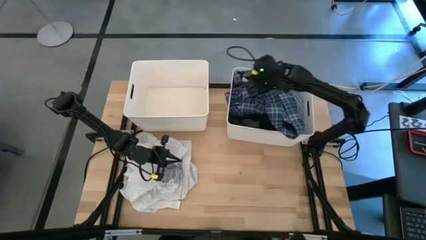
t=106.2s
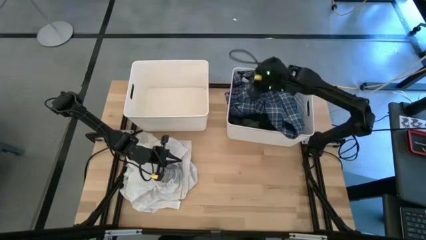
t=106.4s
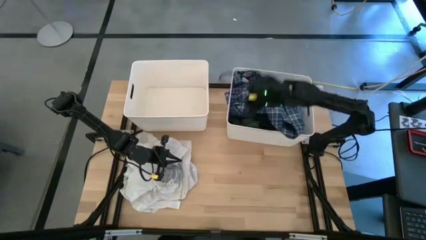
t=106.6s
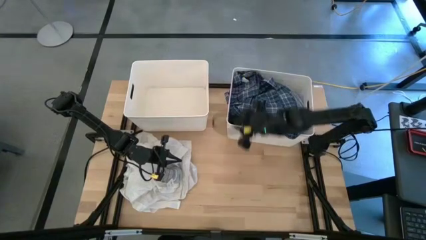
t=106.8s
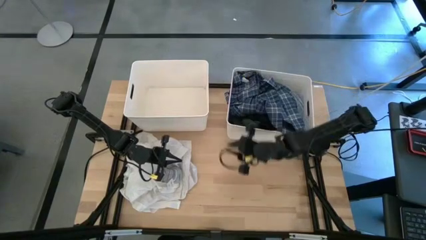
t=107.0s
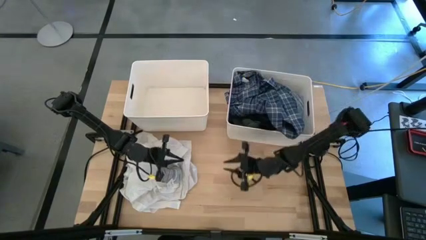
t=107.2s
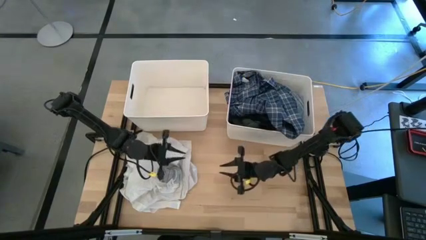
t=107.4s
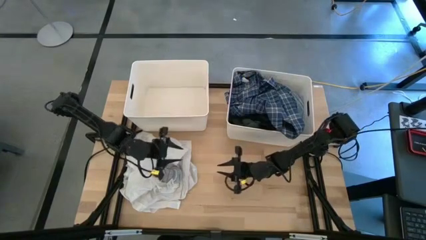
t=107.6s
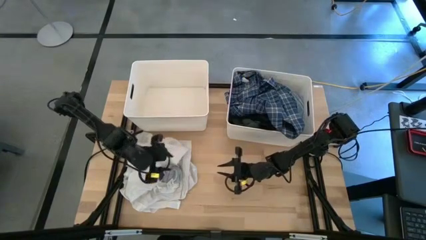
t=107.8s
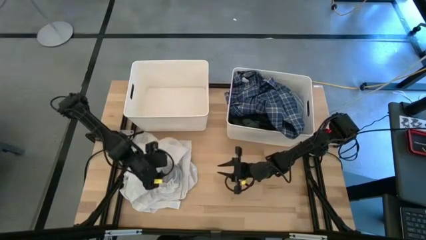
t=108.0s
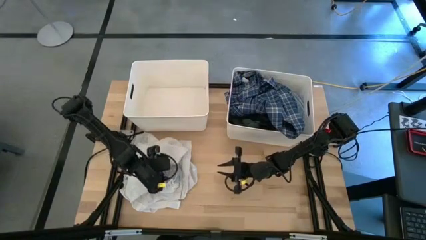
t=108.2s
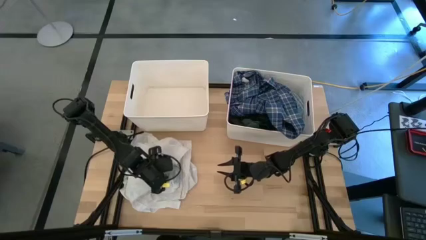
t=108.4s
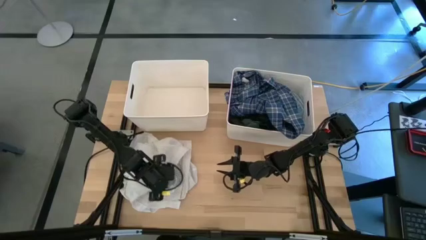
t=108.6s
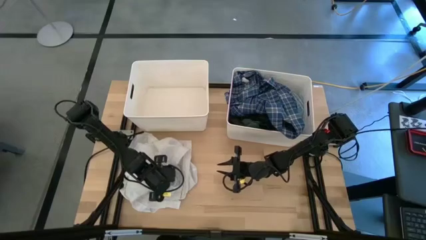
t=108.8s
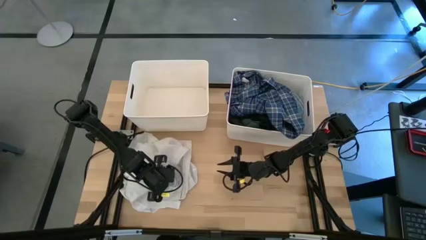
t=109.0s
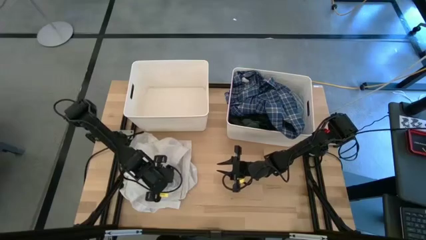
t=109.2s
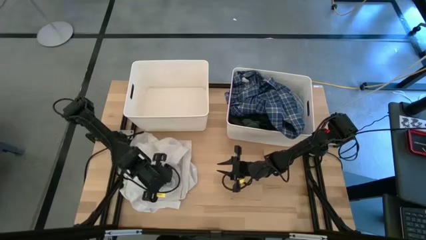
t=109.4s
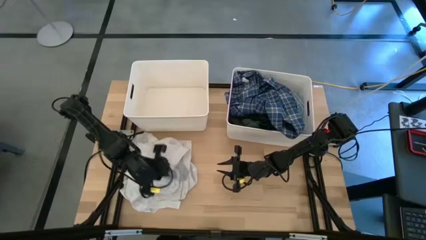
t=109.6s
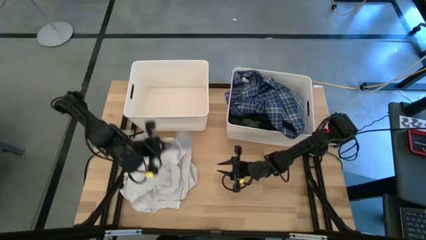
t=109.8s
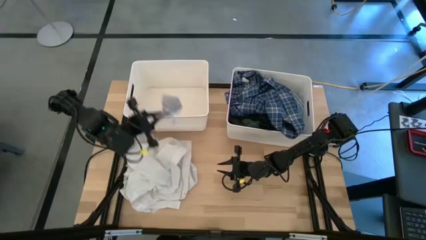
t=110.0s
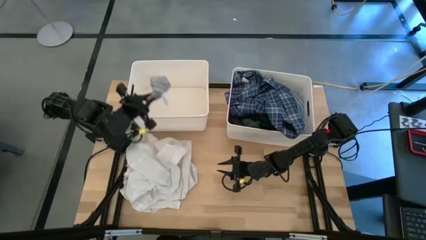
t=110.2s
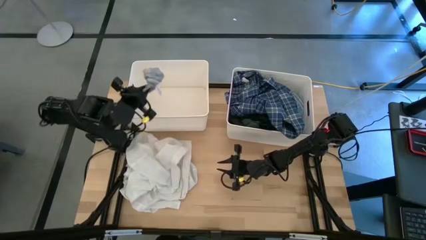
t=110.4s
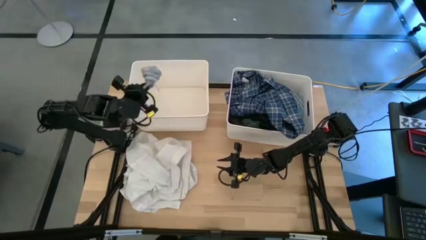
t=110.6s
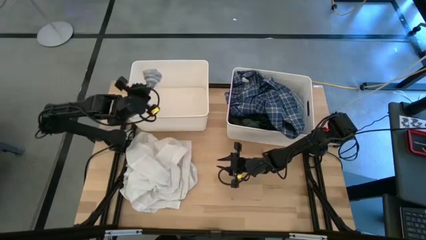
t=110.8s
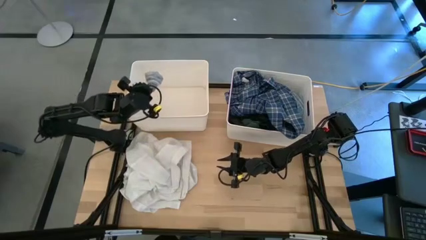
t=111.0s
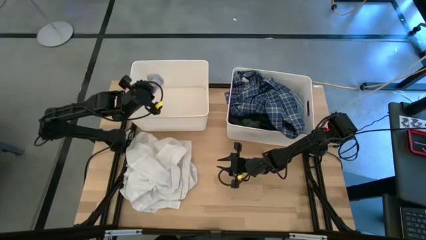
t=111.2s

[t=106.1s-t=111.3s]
Task: Sort clothes
Put the gray socks into the left white bin

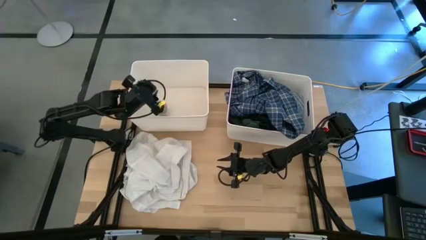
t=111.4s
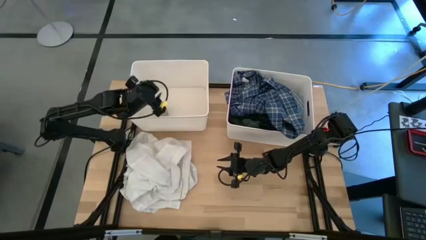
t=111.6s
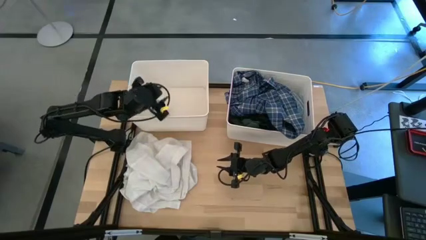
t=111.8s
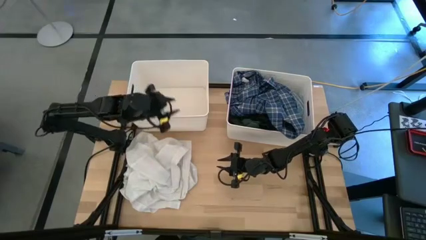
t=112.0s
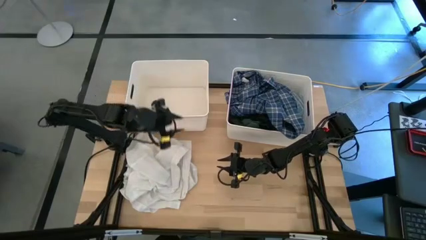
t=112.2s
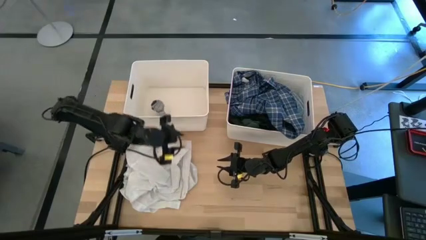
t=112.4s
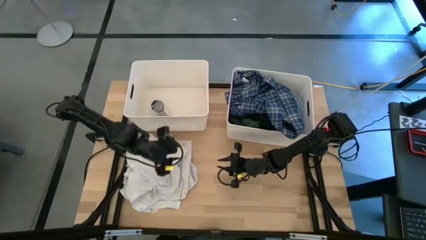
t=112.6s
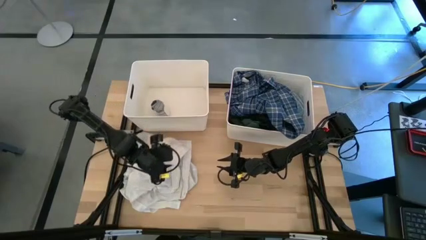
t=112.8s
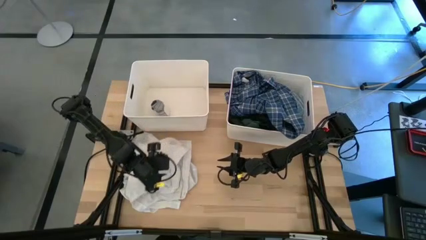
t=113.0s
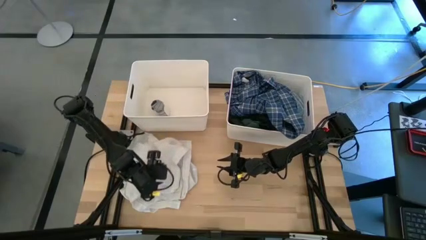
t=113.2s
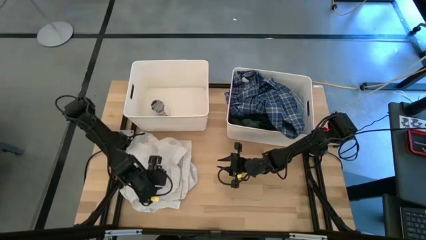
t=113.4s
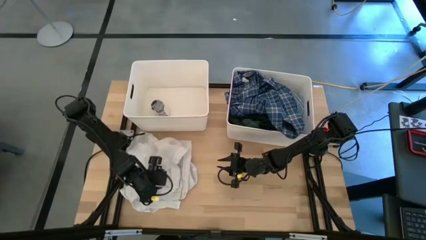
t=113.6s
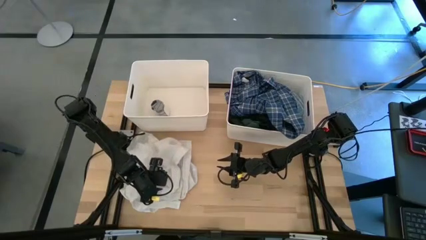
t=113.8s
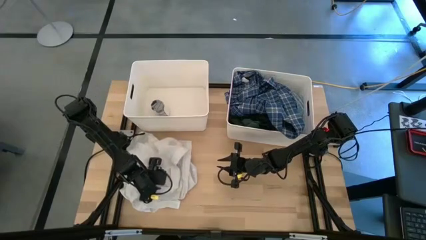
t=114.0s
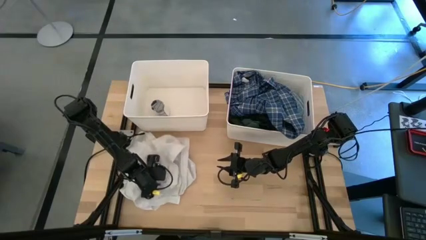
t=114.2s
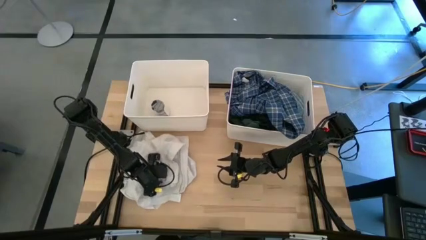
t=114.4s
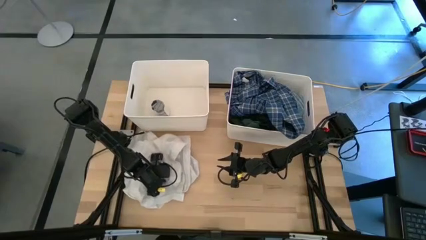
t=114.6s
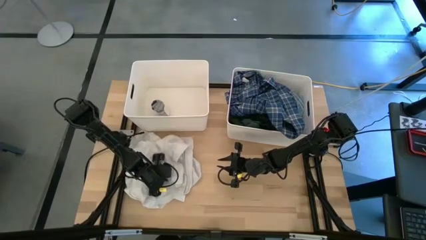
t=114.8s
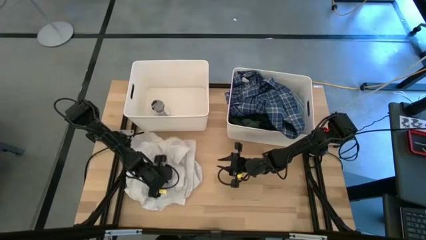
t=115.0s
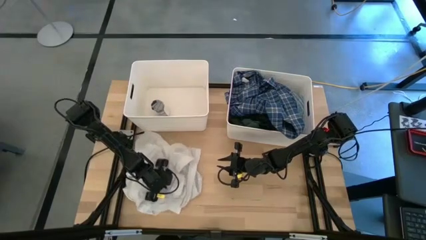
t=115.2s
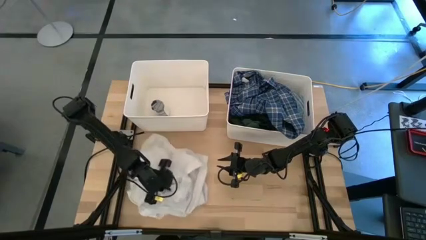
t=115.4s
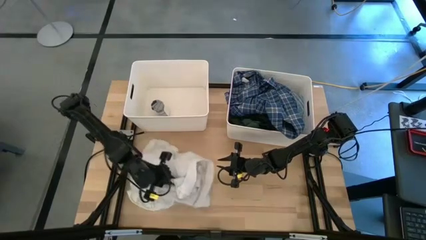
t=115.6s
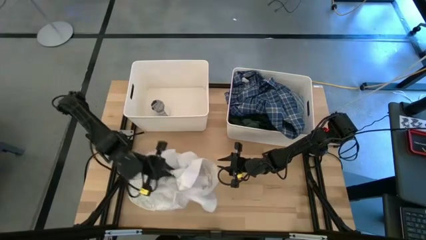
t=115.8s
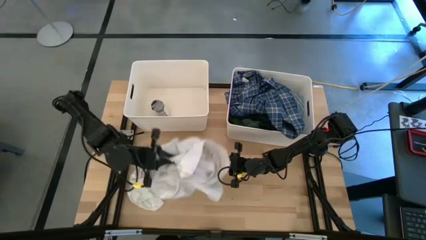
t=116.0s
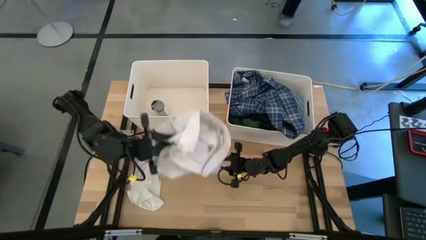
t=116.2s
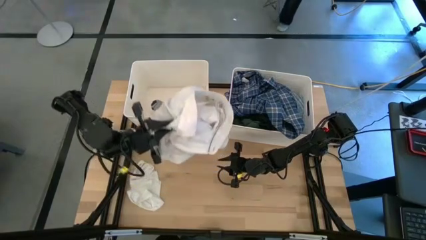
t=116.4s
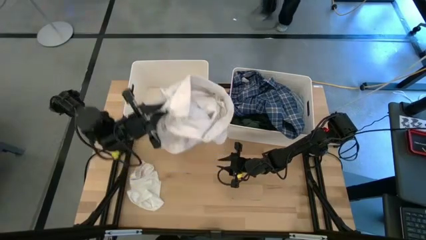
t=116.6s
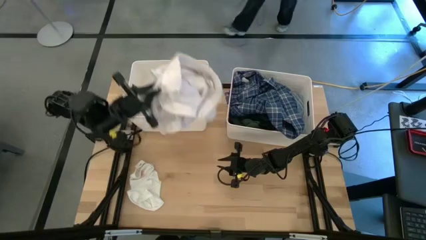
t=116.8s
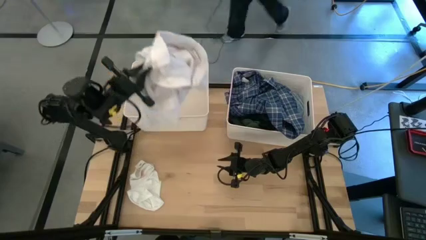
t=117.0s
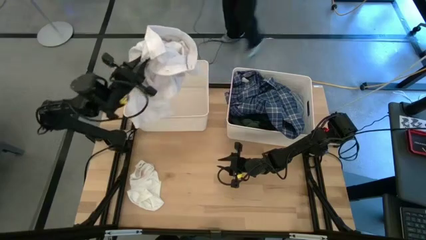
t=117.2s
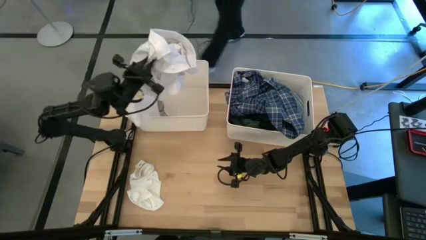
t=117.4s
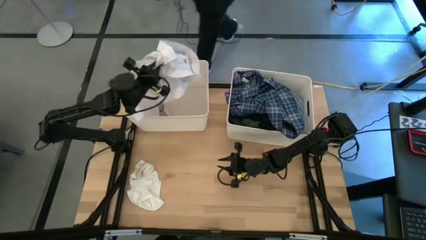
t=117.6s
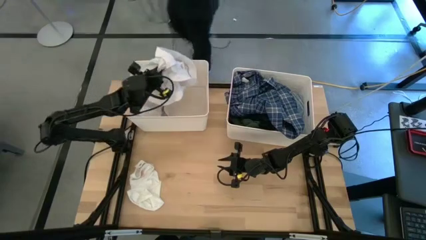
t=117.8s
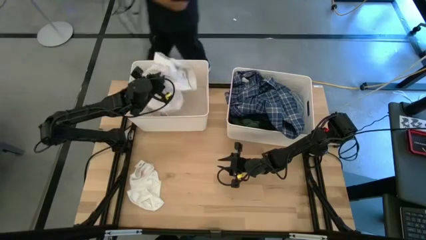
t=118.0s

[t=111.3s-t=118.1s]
Put the white shirt into the left white bin

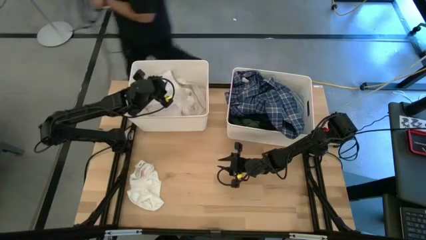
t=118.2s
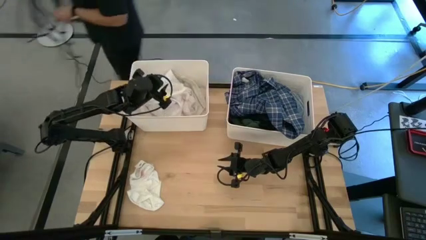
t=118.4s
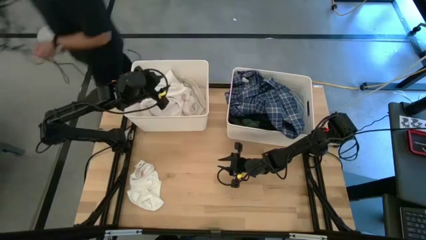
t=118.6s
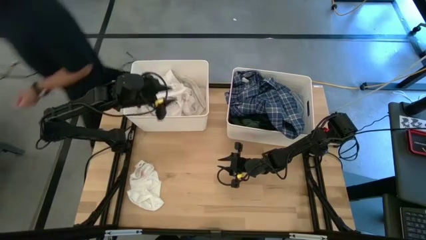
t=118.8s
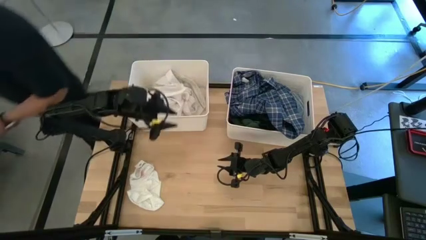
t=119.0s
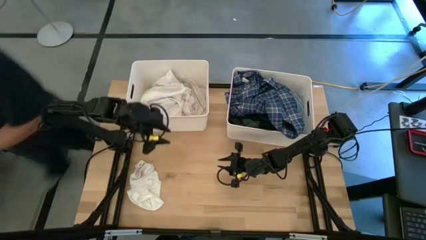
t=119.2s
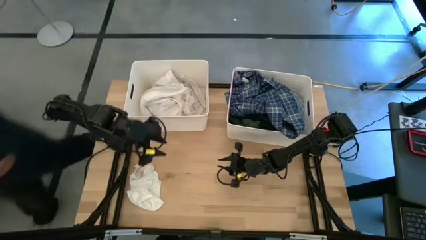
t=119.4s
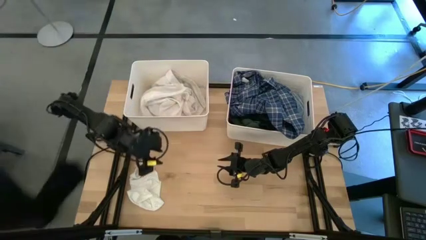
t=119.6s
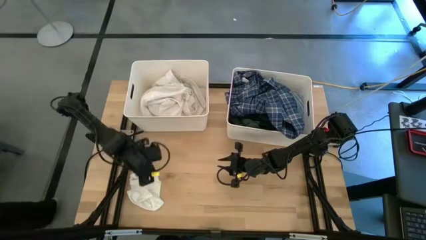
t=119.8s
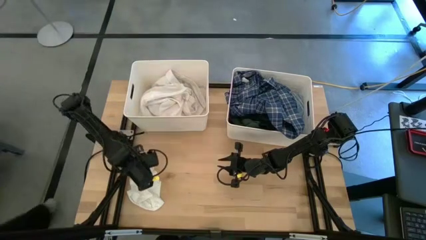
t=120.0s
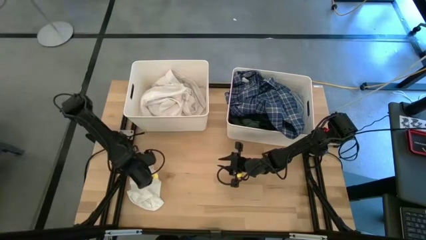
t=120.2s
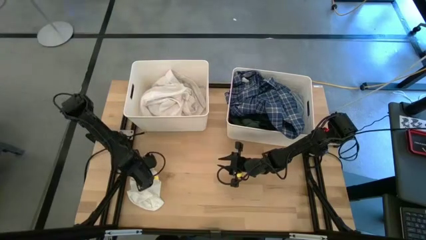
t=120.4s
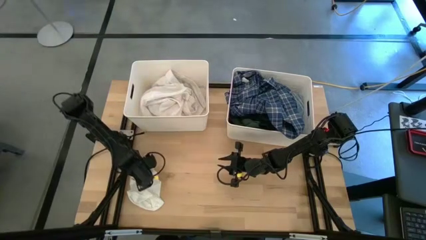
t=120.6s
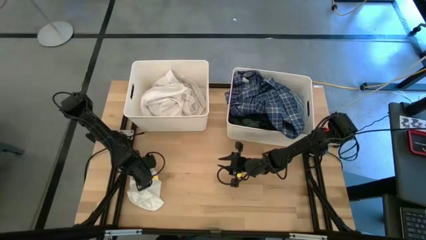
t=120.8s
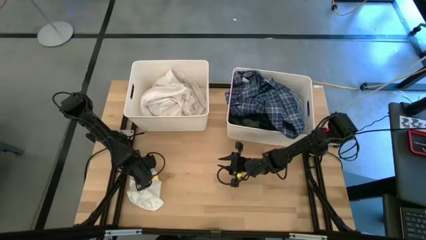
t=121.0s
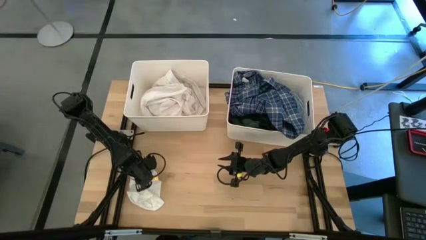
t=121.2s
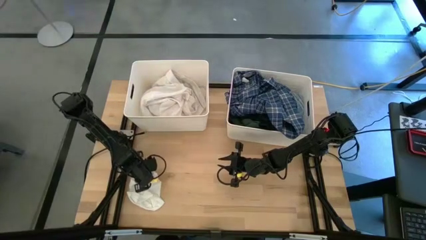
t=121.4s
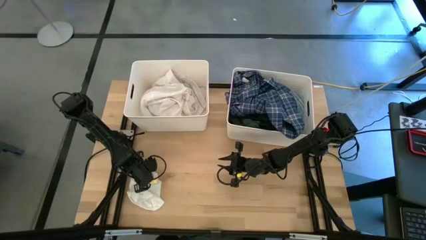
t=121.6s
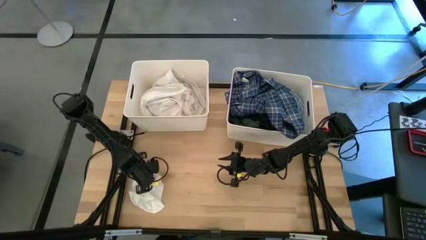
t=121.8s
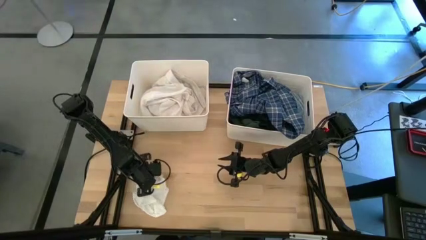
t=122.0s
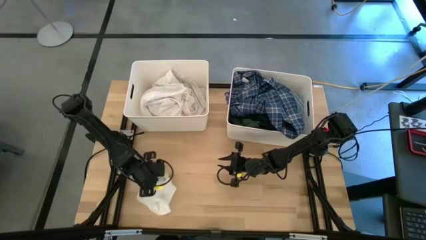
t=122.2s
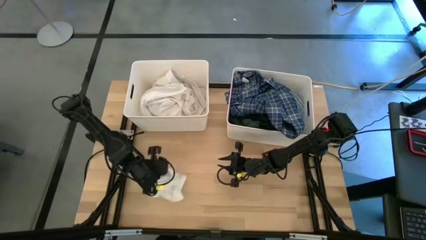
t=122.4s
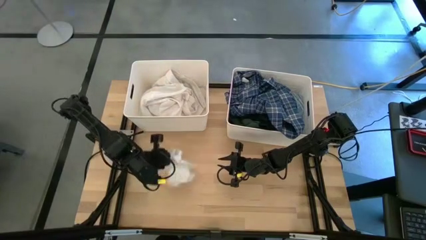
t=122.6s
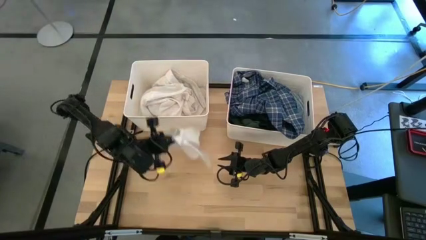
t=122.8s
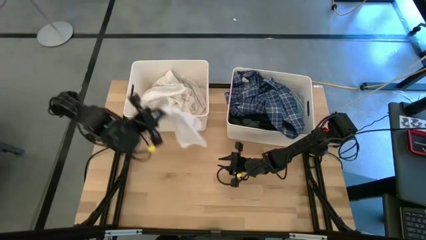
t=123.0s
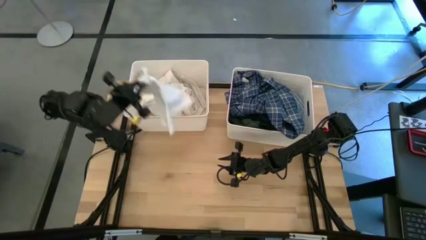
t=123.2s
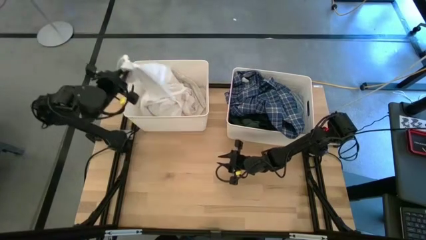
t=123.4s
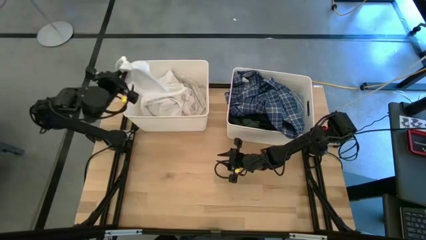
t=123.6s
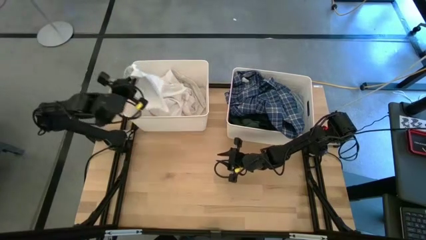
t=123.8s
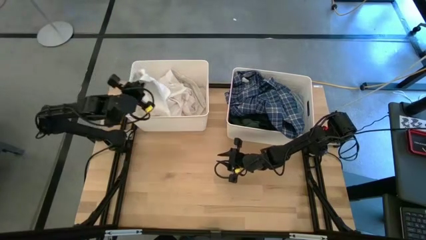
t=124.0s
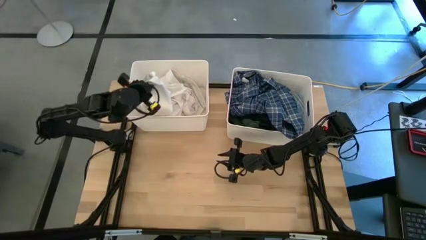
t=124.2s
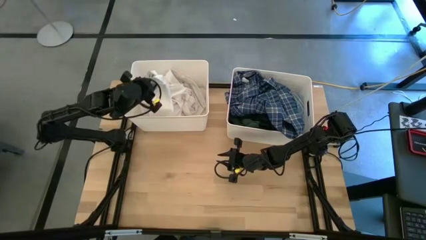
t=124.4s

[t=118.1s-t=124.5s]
Put the white boxer into the left white bin
